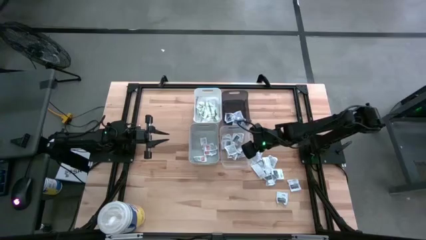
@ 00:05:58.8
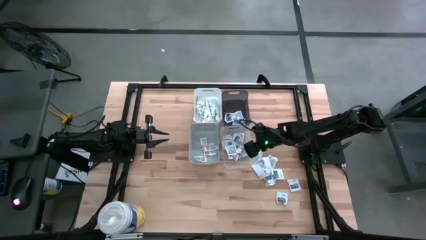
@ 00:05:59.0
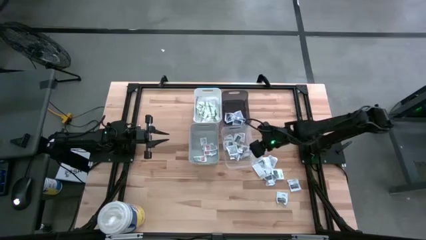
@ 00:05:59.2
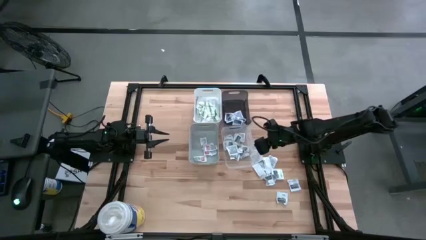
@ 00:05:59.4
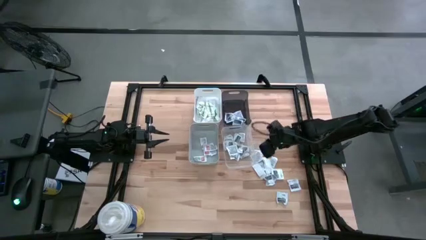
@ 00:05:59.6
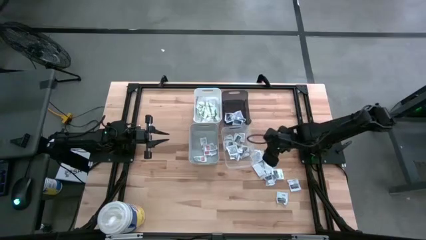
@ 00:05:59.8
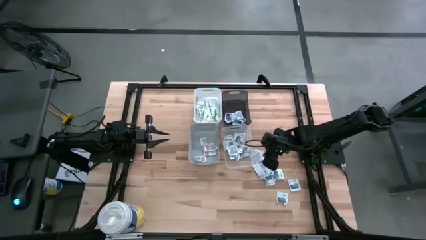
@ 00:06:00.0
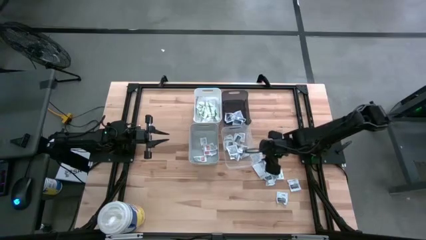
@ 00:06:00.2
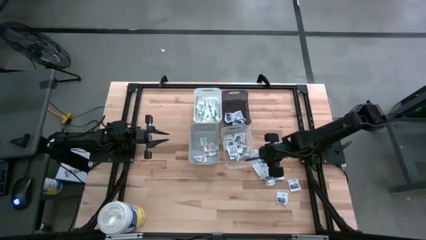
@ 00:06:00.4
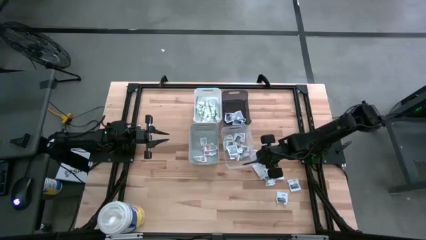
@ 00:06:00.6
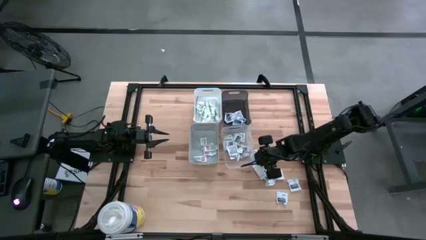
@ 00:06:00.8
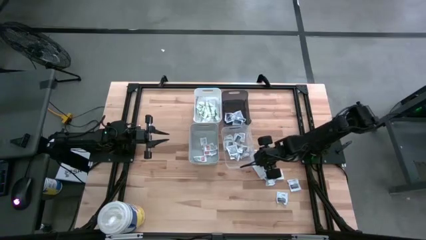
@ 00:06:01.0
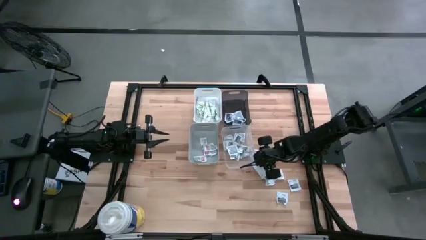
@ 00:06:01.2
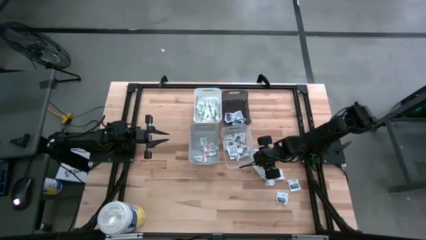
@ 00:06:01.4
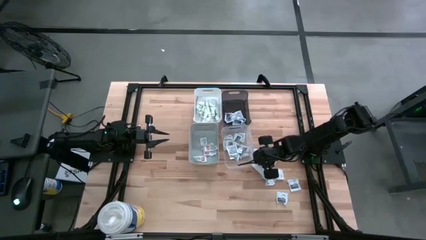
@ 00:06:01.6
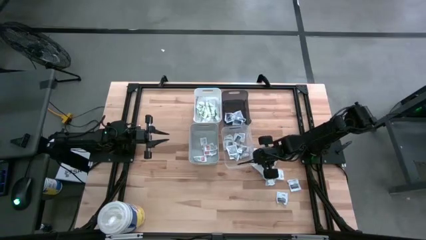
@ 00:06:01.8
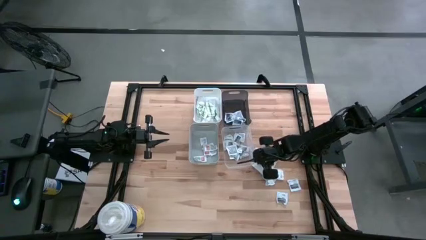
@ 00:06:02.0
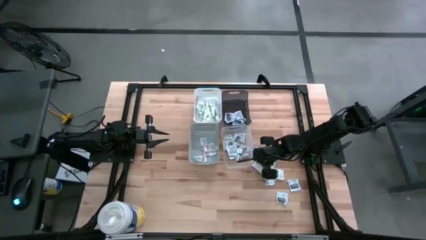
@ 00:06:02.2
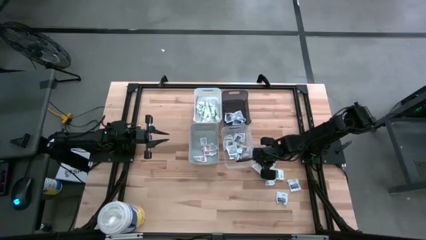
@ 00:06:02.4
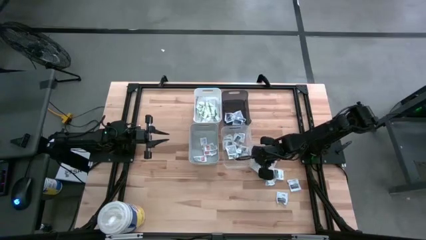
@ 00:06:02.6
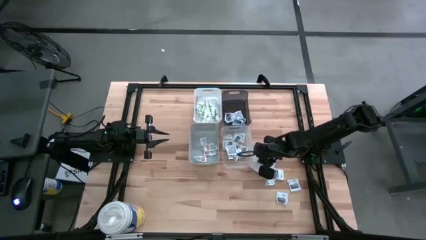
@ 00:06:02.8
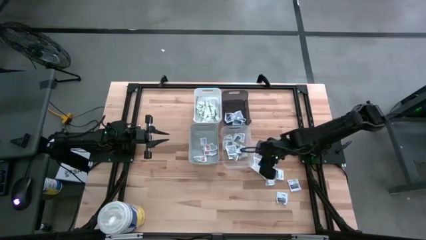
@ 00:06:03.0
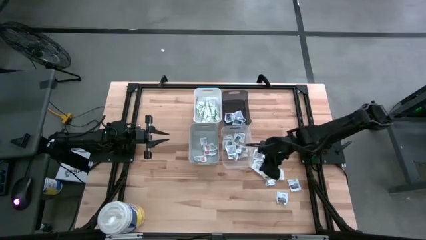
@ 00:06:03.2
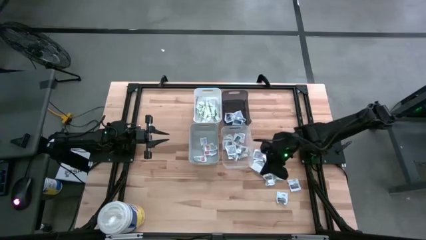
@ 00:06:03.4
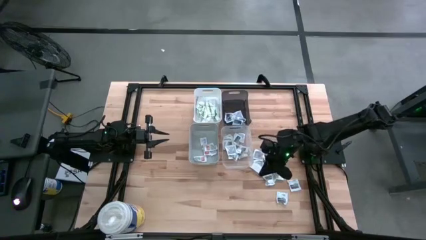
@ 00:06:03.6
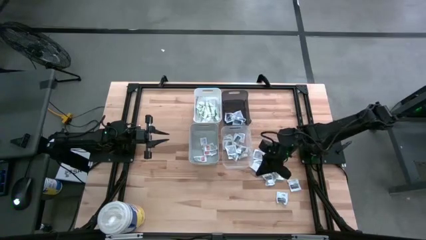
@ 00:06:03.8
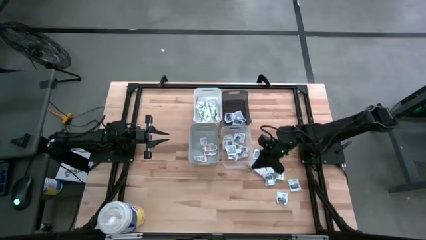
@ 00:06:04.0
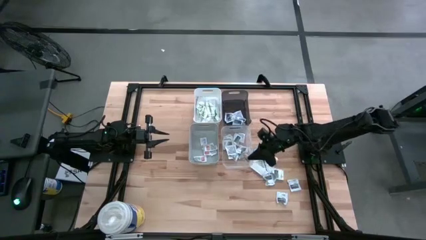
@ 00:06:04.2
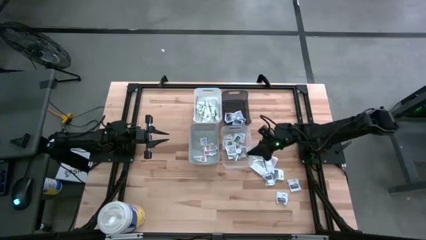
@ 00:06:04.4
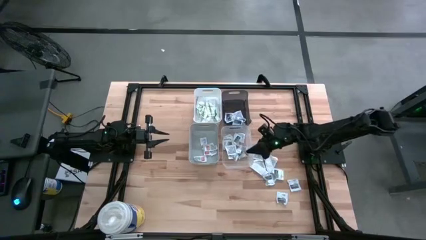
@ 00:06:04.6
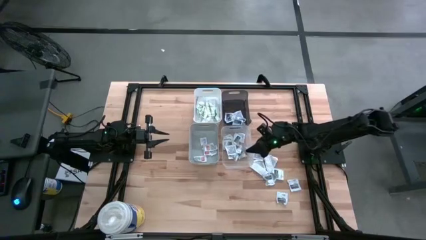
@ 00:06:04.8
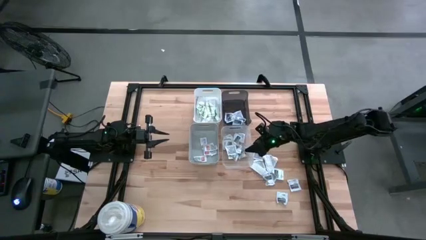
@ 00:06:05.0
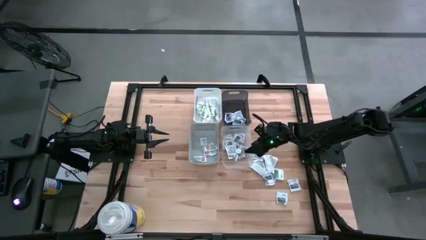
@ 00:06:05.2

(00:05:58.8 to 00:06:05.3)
Task: Pick & Place First Aid Supplies
Put the gray towelette pack into the transparent bin

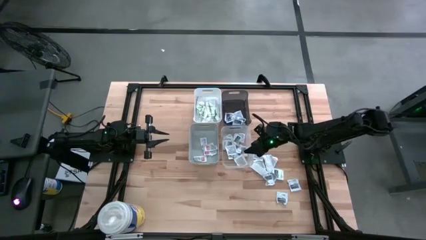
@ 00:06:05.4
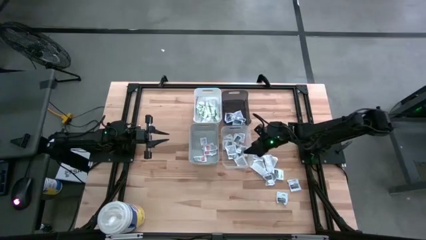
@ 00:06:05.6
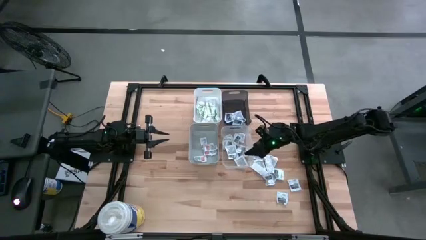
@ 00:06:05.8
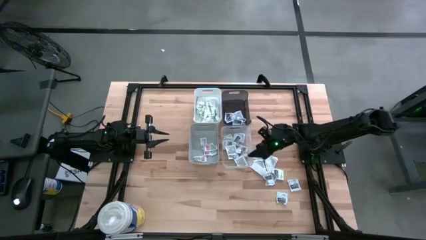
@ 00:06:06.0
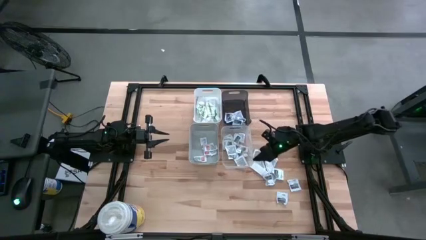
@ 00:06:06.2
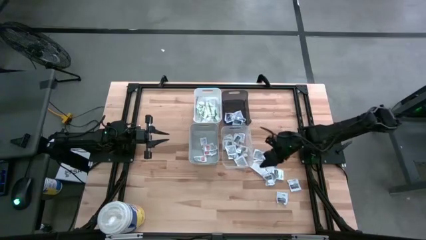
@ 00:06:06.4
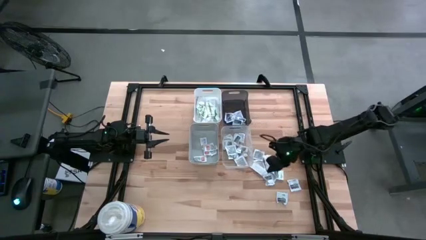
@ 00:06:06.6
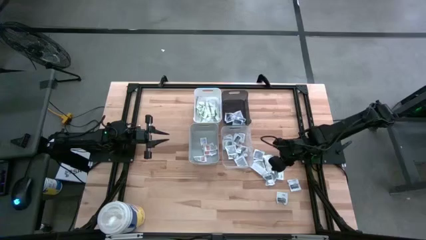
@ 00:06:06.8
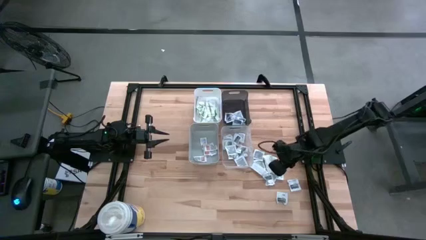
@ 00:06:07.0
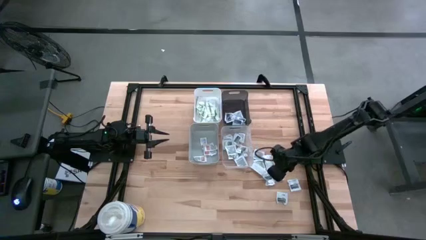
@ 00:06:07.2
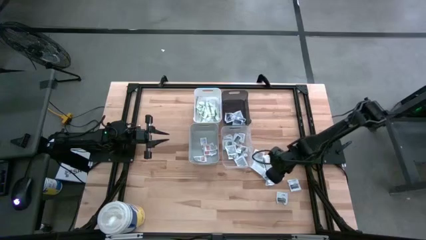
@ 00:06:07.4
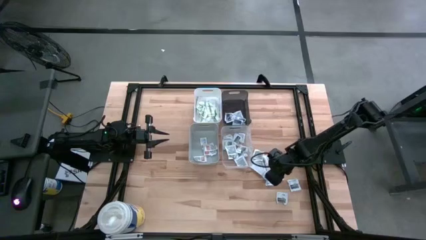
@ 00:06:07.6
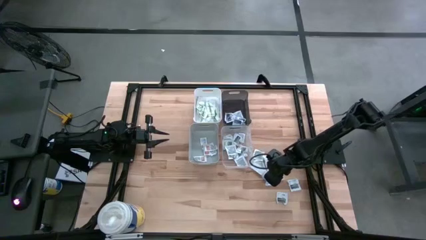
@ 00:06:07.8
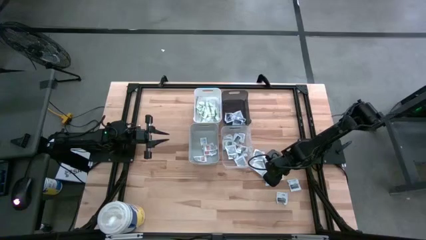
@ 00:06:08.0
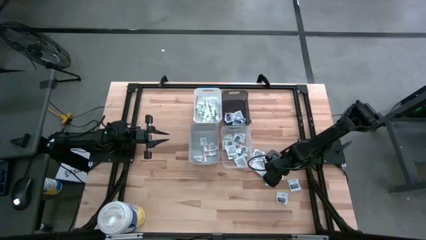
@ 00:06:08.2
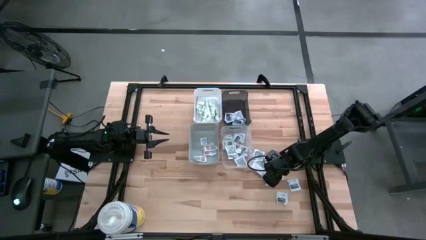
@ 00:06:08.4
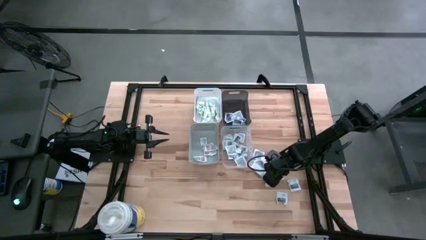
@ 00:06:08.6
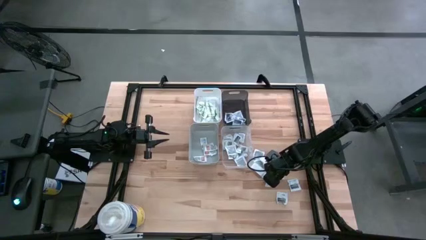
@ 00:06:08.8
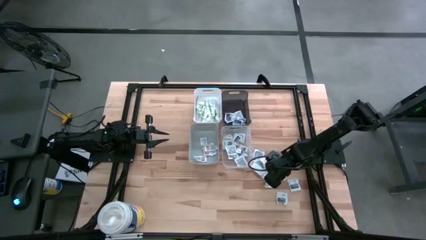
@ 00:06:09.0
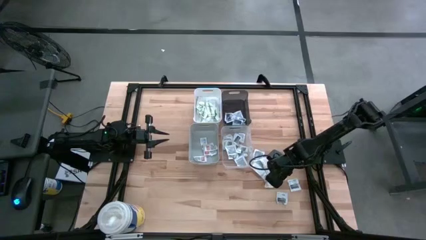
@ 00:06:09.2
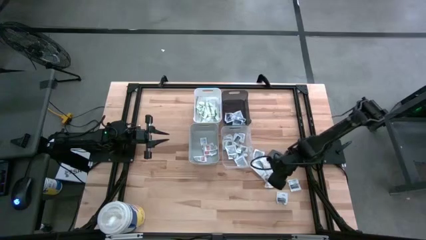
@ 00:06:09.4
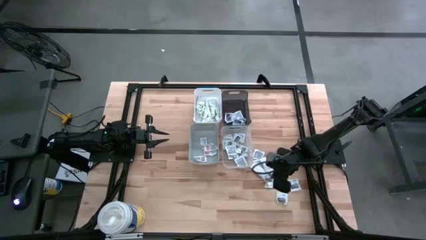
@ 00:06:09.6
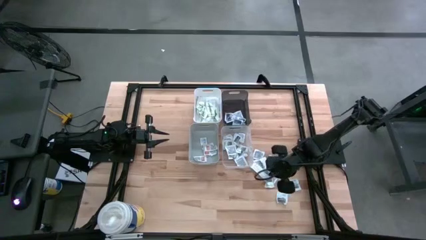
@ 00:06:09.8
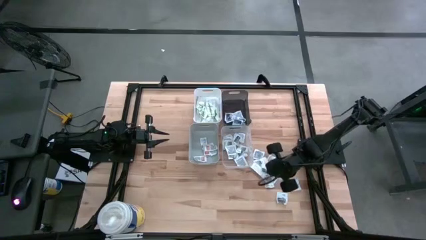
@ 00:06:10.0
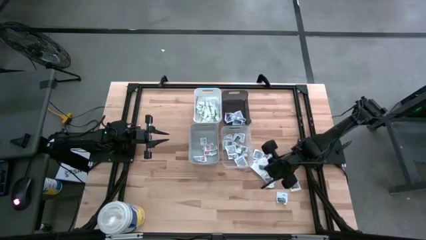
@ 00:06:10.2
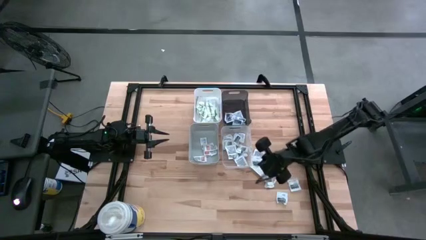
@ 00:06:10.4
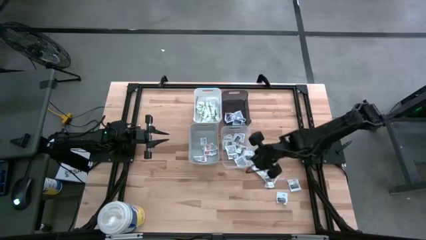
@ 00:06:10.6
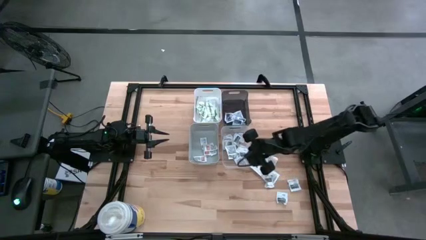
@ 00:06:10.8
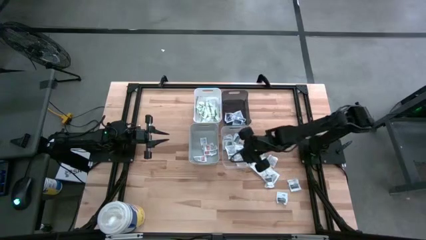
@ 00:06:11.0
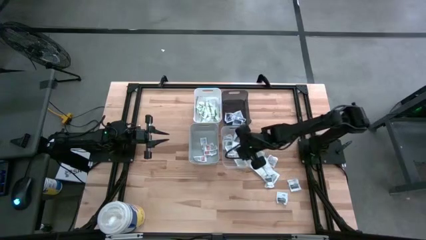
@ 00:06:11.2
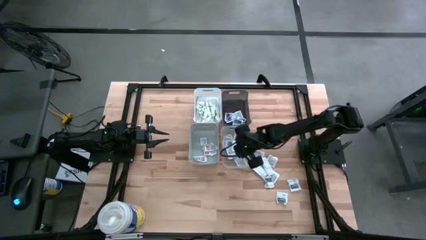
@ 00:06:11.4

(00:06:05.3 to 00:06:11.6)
Put the gray towelette pack into the transparent bin
